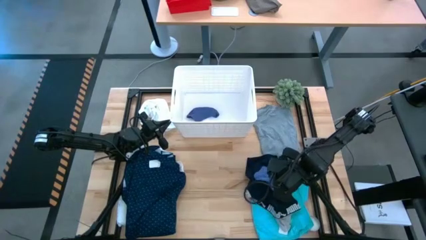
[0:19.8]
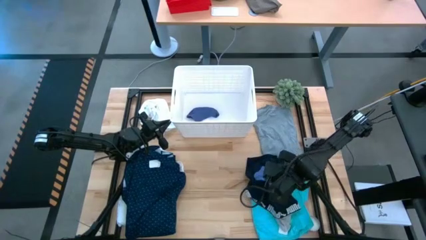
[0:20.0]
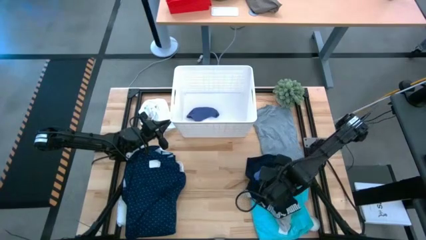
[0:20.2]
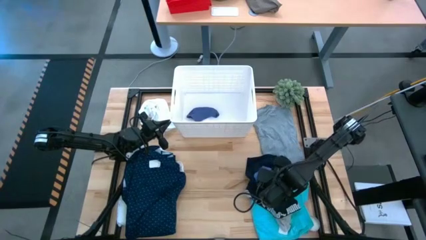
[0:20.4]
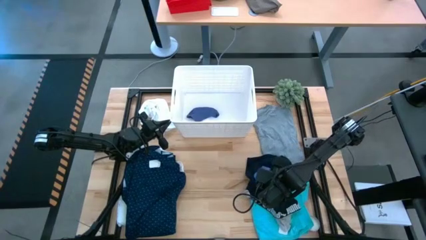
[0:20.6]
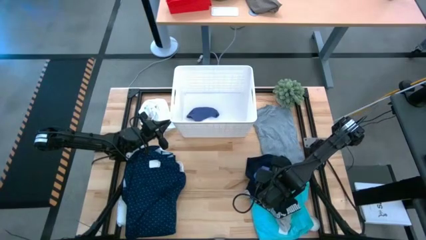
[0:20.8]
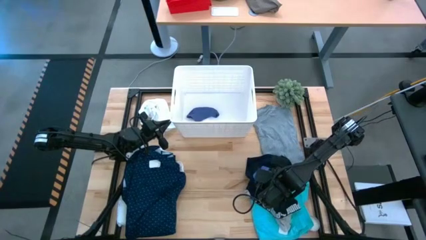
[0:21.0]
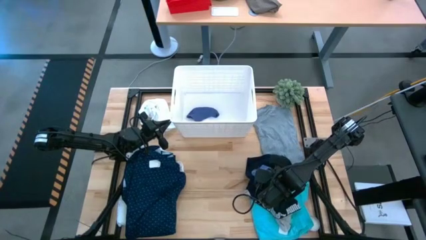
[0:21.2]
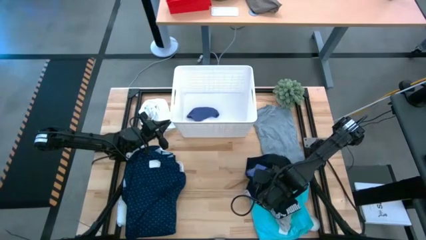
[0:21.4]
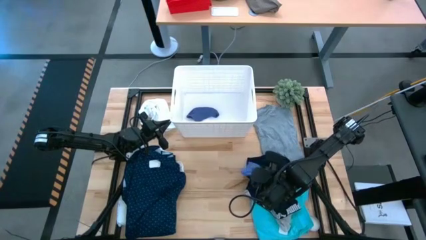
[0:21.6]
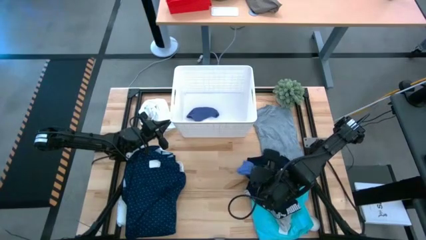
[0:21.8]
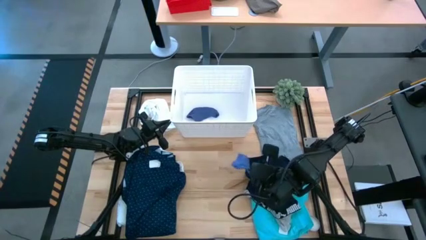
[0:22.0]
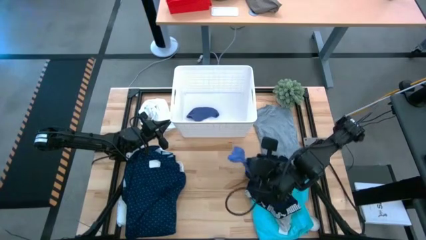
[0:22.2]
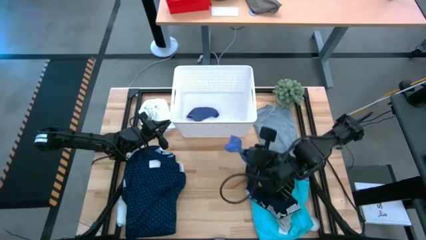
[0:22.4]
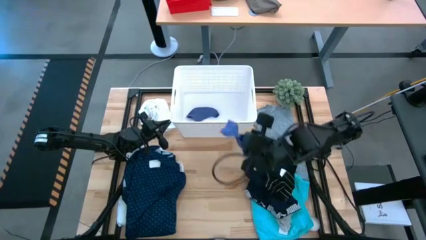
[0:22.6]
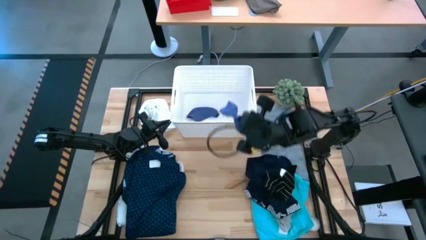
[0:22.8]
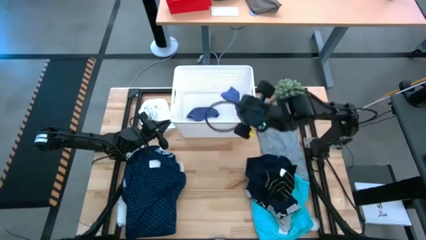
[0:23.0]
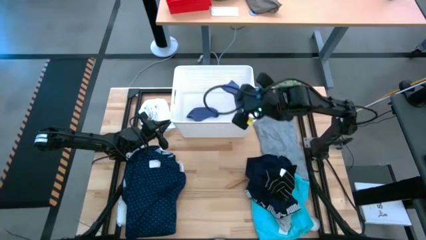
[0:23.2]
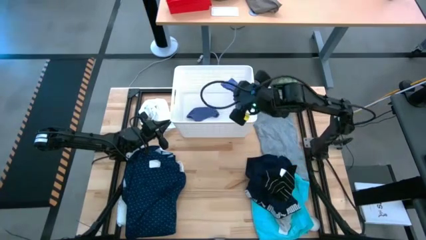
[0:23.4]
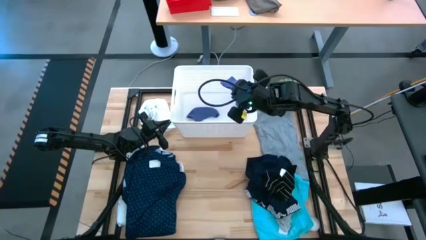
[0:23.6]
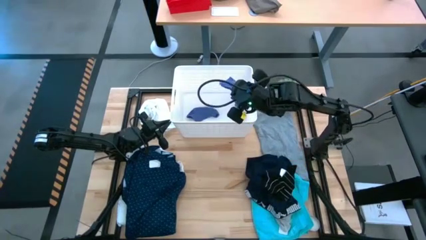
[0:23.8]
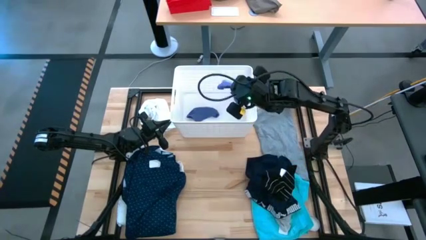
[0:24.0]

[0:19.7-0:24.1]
Task: Sort clothes
Put the purple sock into the white laundry bin

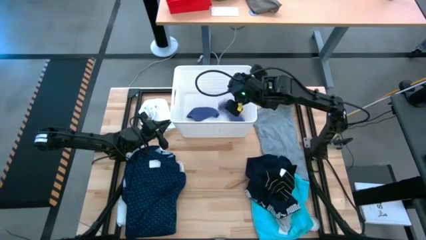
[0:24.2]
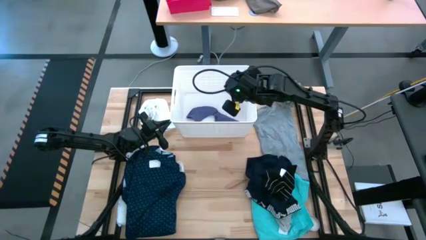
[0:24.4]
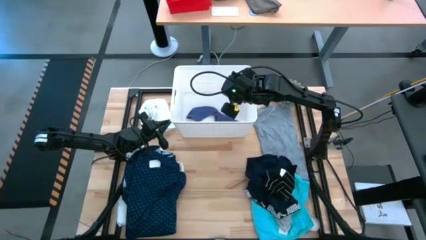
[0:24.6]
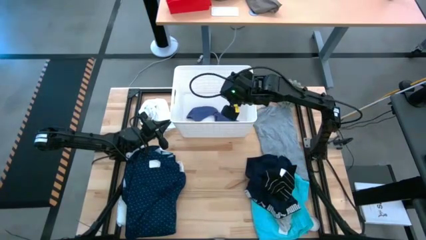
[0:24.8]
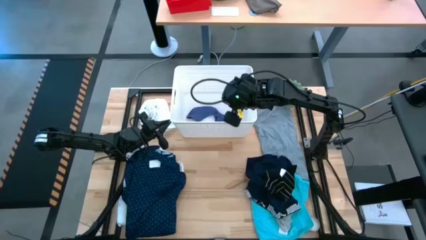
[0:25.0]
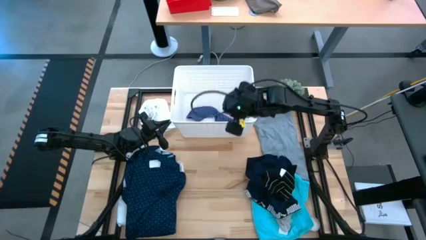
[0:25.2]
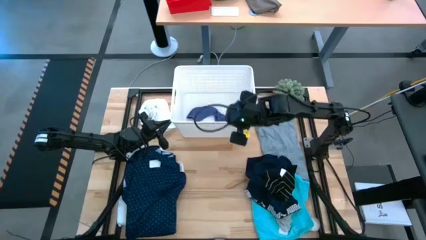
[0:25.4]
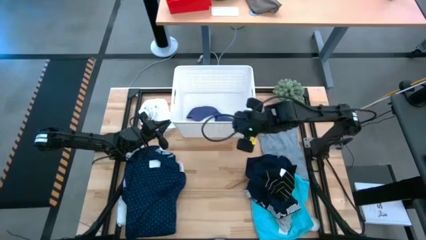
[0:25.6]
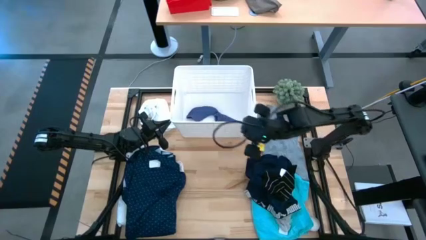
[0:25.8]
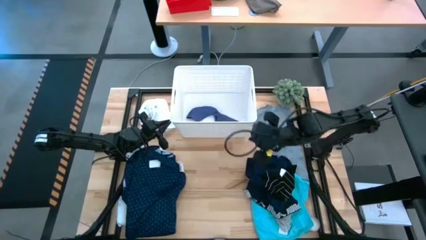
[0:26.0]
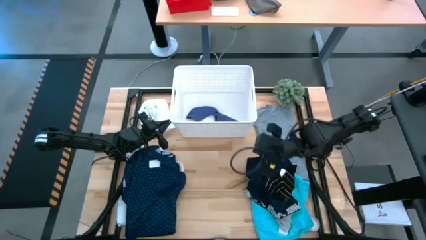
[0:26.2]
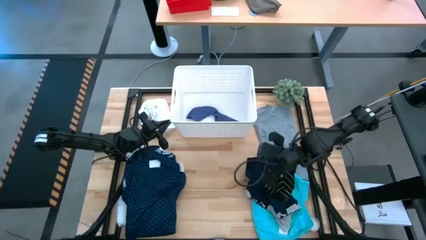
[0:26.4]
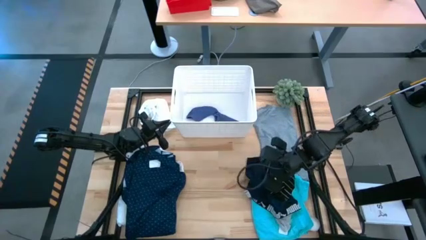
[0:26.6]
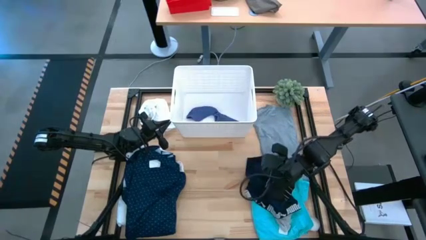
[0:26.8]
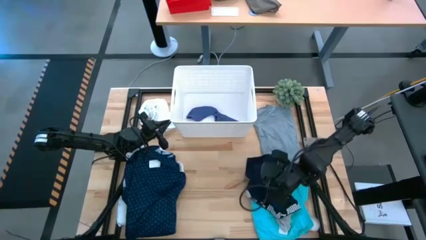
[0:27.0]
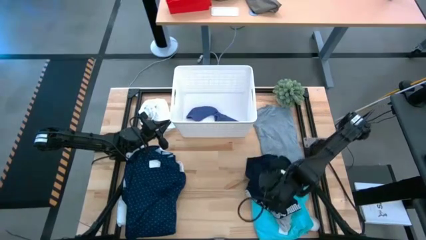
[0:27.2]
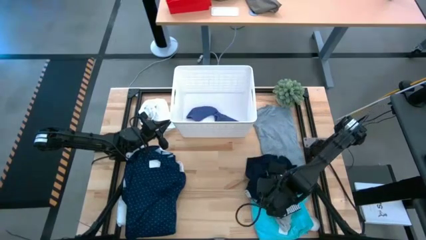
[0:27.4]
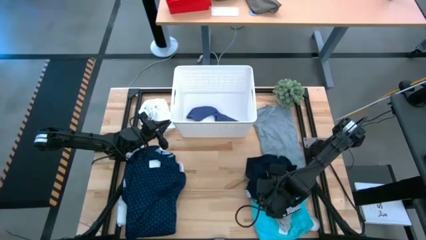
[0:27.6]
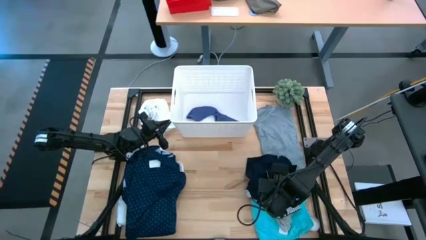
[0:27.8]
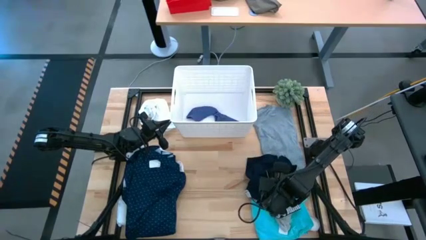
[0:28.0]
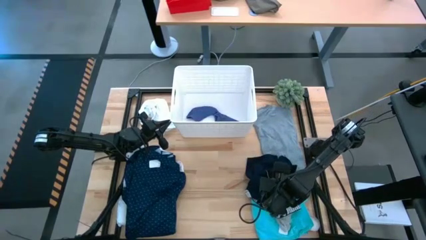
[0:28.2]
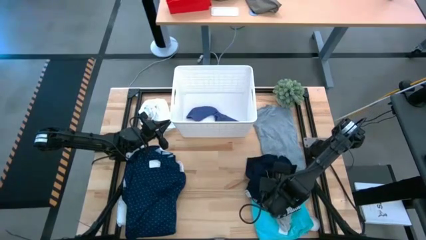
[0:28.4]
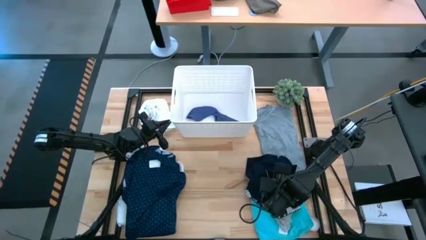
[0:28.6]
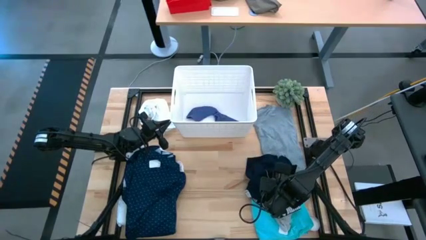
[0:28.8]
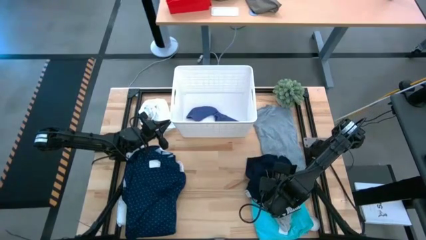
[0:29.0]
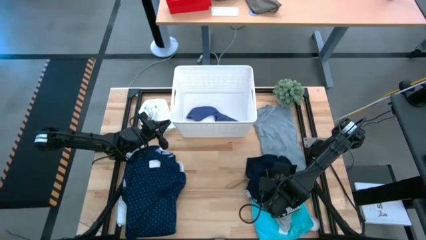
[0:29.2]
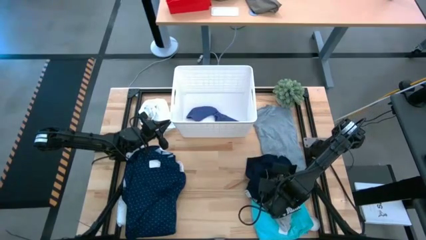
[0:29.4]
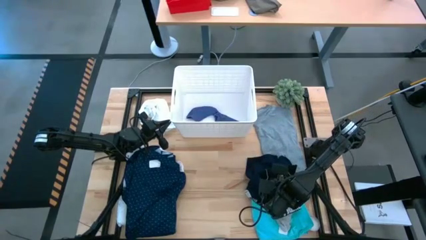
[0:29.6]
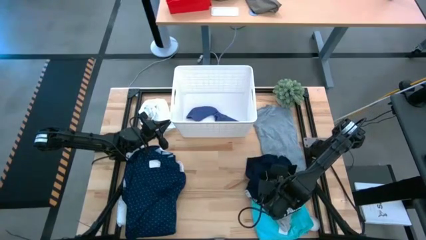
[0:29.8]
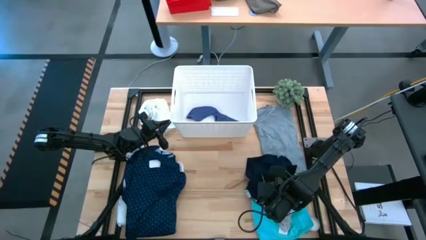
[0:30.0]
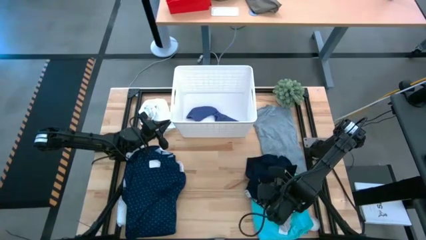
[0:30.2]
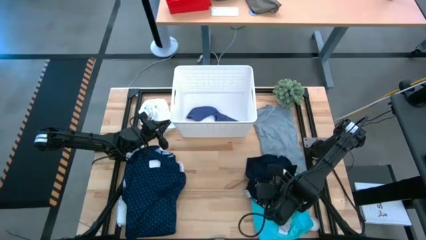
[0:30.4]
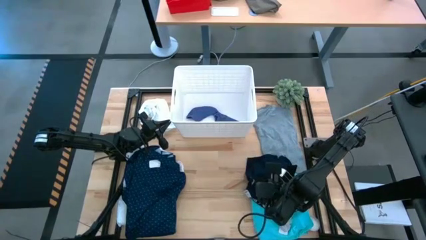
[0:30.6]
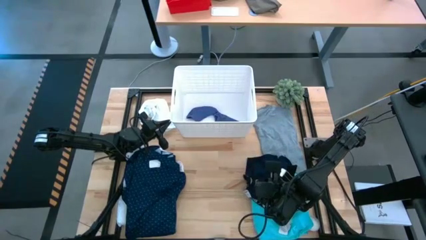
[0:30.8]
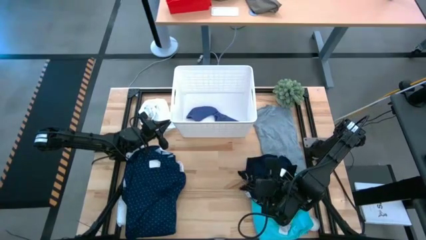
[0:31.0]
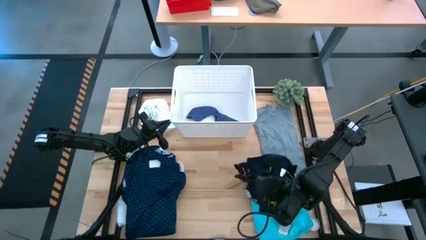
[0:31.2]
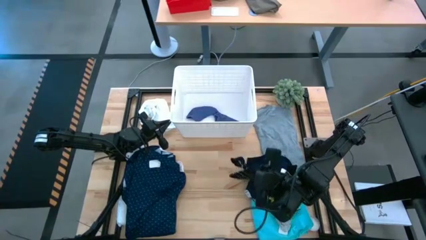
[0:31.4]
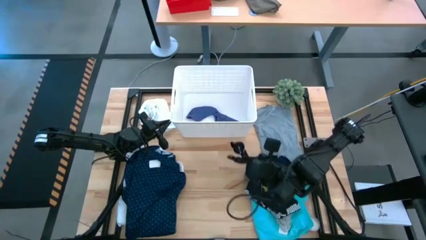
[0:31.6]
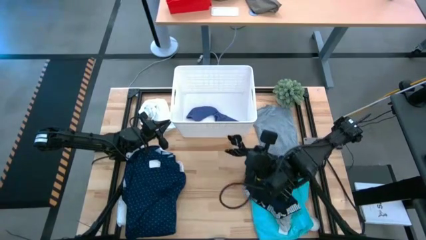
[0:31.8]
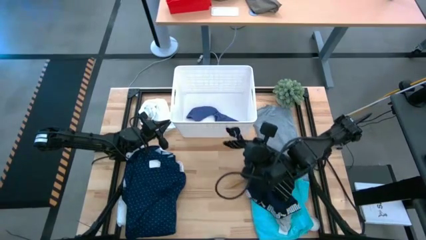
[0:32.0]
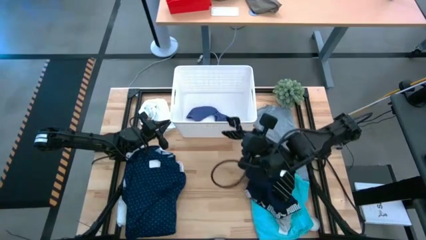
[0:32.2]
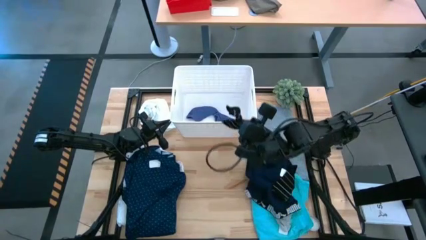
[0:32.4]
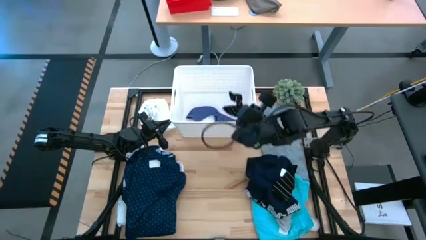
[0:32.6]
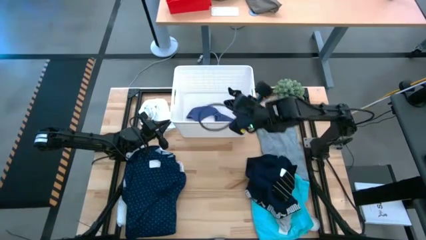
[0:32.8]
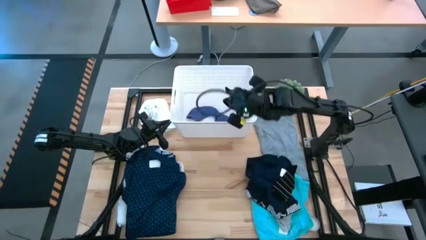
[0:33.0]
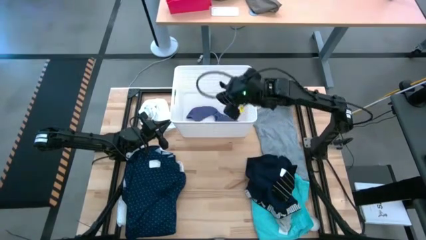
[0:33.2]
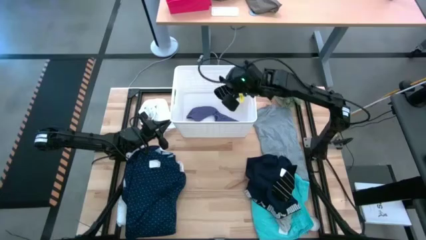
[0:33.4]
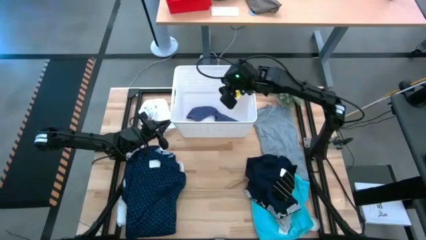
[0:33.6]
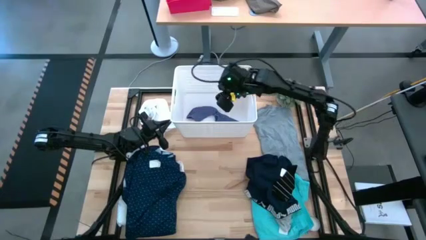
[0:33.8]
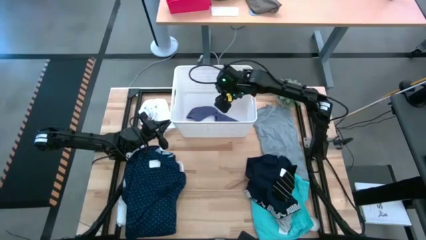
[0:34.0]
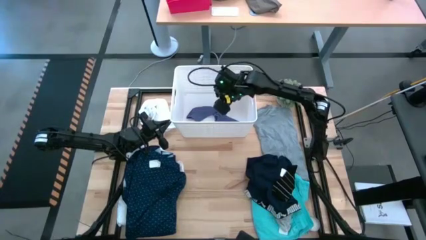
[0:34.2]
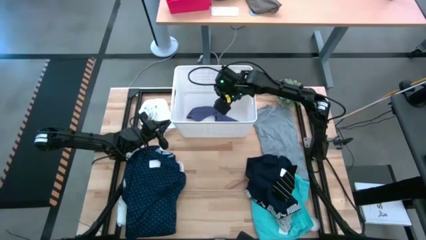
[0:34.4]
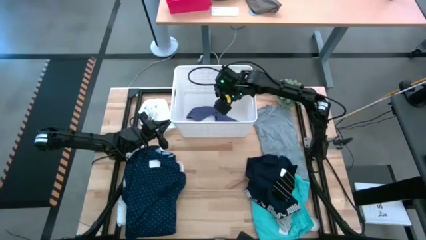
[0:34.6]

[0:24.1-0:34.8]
Put the black striped sock into the white laundry bin

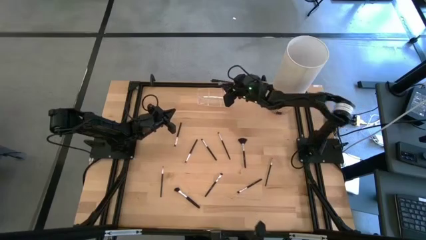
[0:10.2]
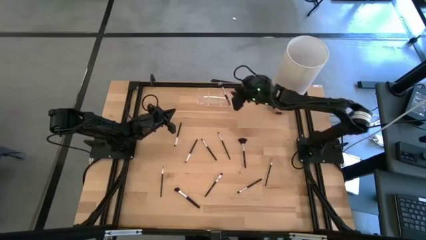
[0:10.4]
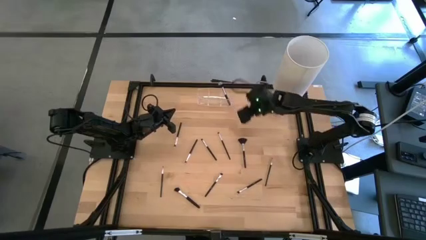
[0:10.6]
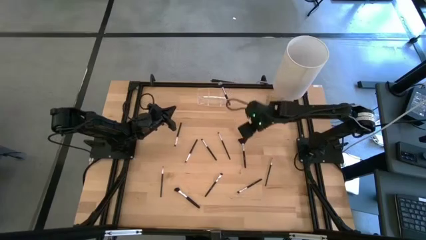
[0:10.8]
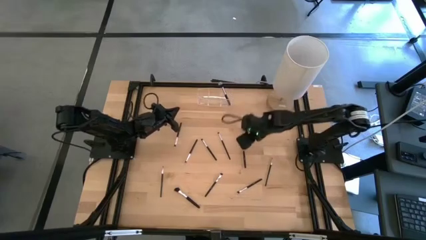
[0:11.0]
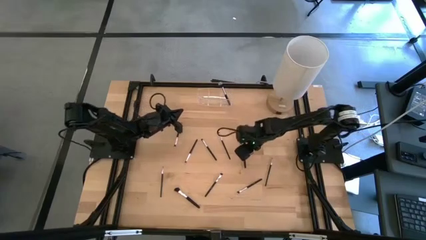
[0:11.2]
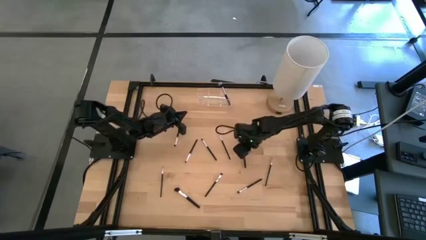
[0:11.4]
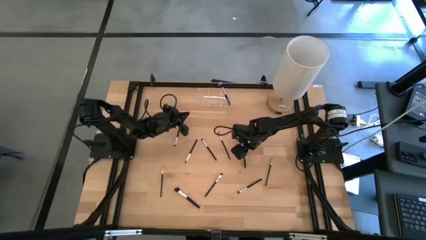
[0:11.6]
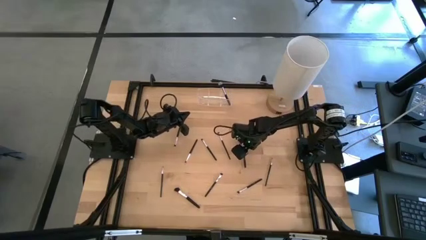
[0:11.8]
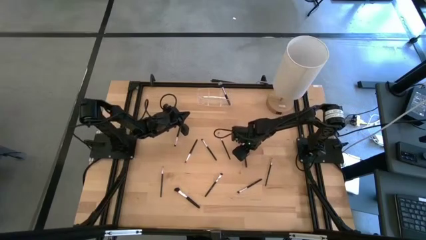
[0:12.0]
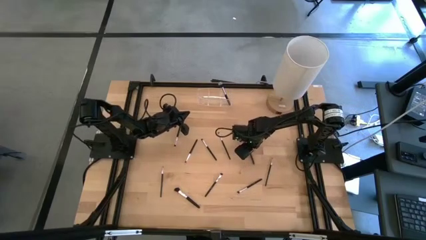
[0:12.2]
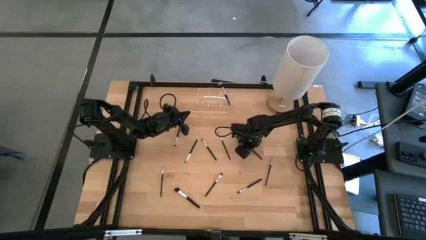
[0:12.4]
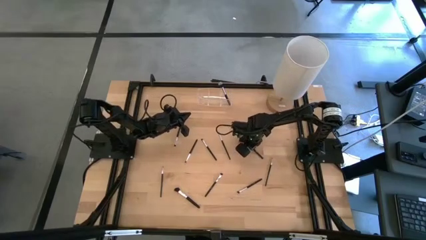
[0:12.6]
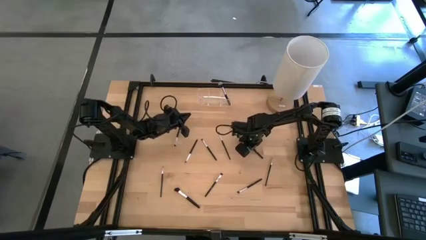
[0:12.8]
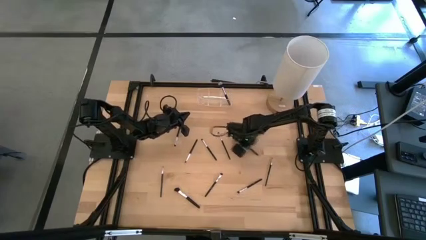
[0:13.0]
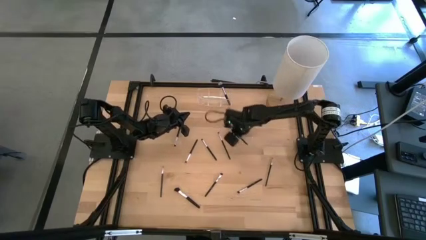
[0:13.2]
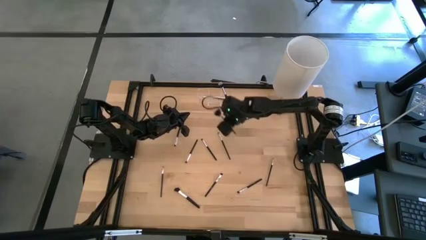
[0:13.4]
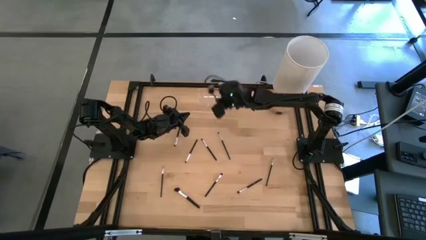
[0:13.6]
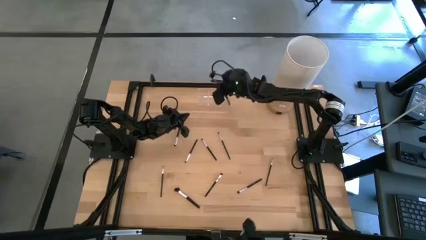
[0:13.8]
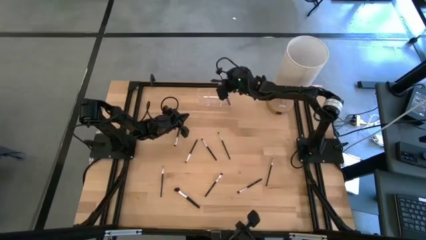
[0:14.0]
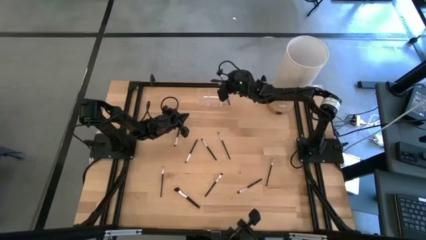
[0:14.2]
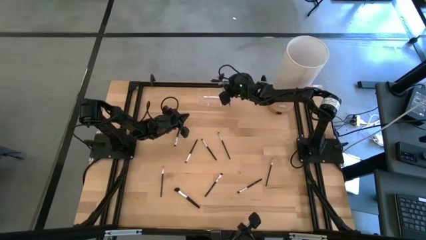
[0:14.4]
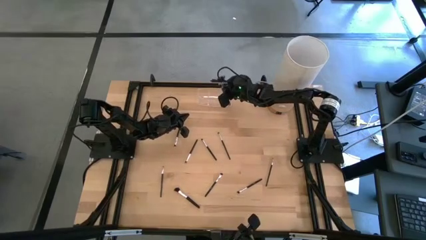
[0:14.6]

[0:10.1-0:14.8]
Task: Put items in baskets/containers
Put the black highlighter brush into the transparent organizer
